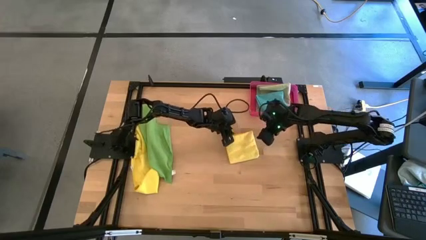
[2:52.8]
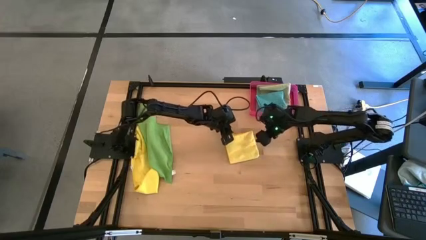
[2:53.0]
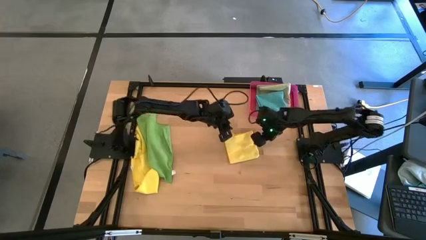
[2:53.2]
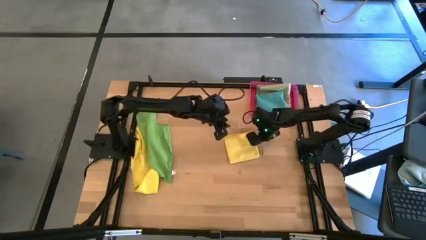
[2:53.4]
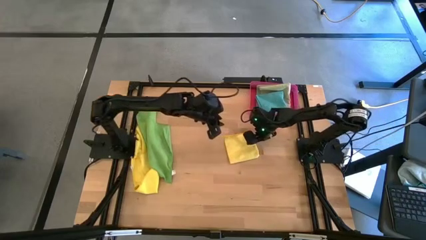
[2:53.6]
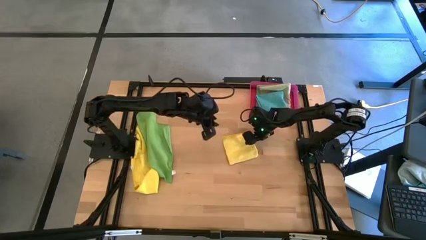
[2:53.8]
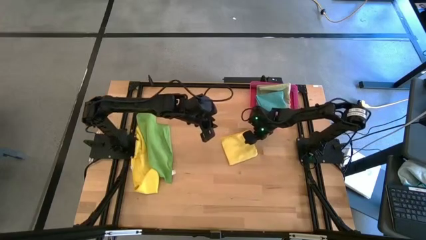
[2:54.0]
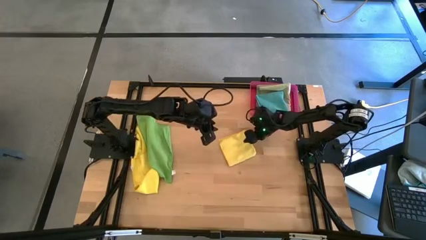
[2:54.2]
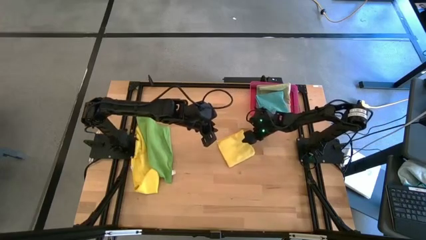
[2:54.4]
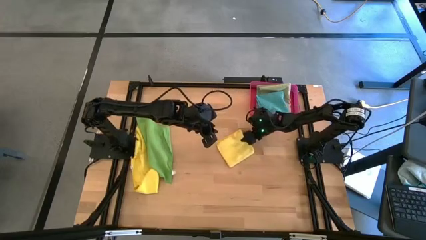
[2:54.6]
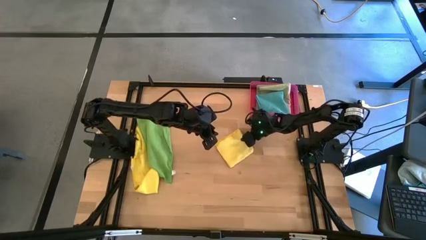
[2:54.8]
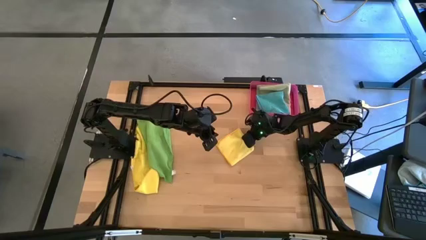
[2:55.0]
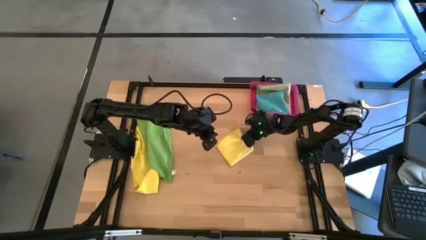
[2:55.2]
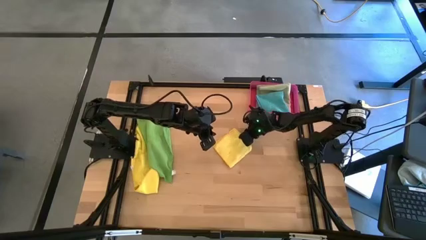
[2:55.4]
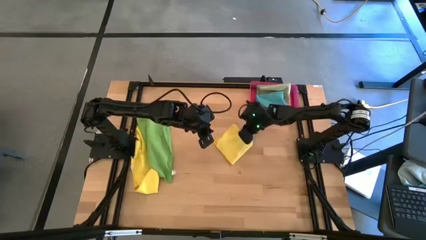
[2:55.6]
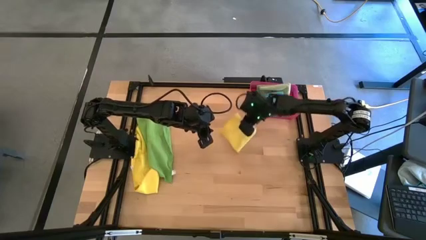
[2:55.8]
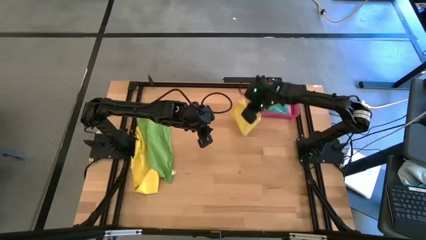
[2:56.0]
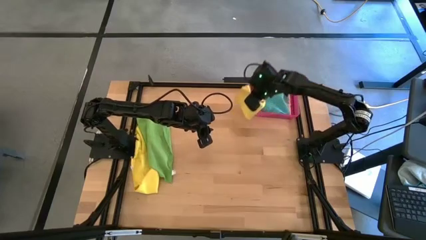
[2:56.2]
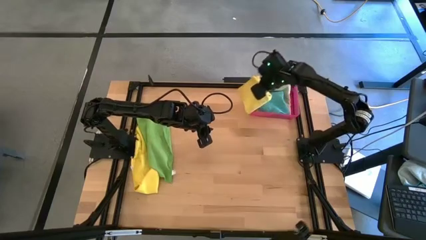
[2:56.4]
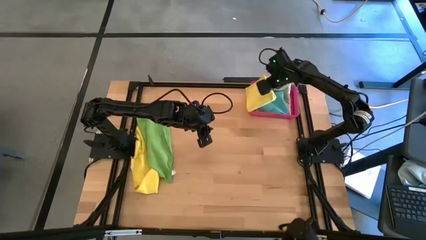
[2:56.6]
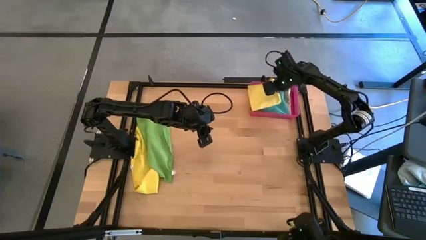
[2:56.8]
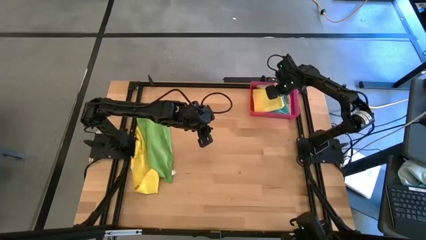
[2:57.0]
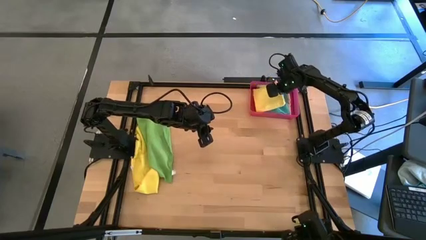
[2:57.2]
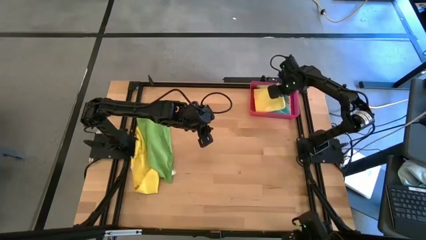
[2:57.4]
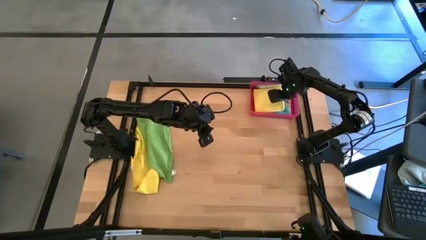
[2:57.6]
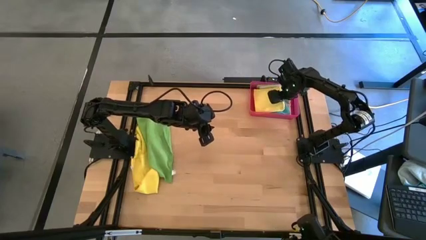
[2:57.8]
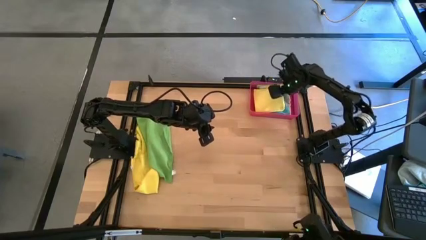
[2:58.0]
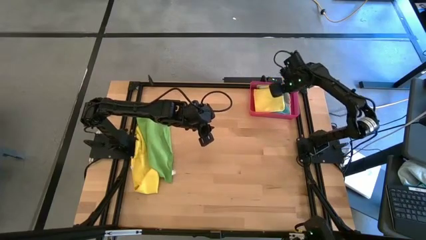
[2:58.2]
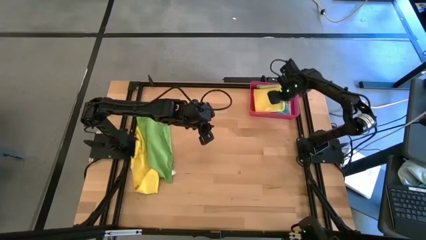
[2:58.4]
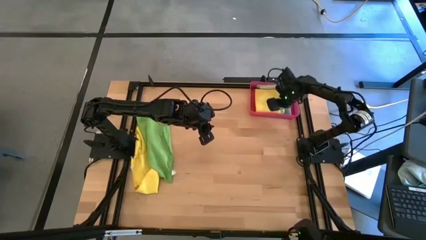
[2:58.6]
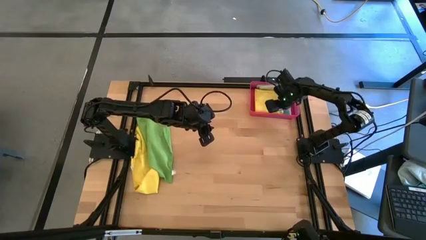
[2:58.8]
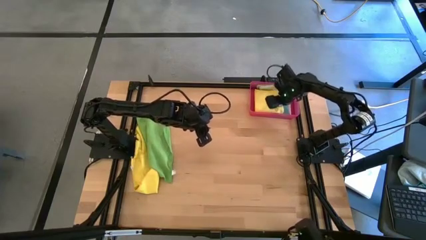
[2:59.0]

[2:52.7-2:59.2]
Task: Fold microfiber towels
Put the right yellow towel into the red bin

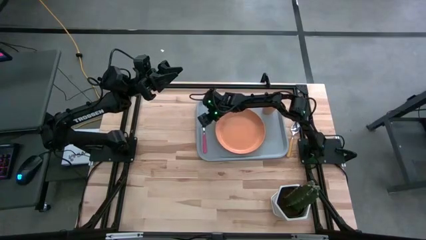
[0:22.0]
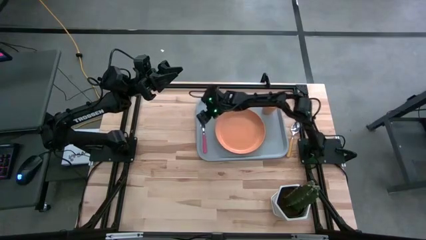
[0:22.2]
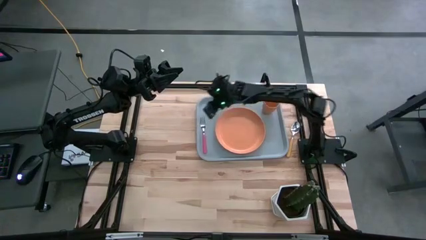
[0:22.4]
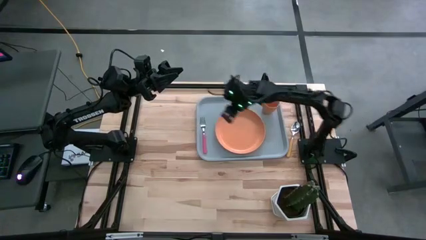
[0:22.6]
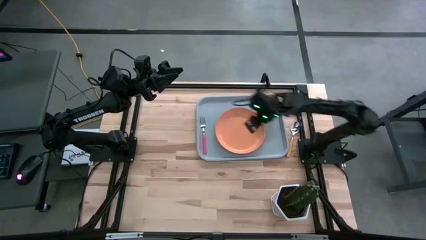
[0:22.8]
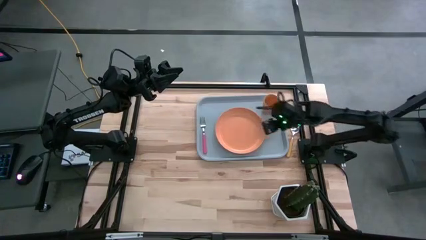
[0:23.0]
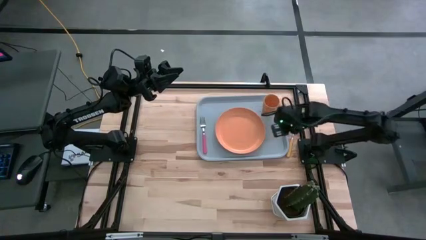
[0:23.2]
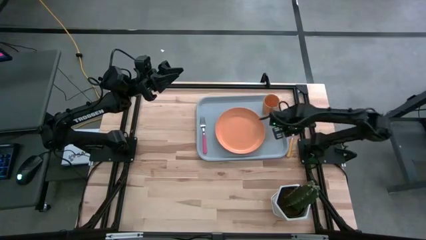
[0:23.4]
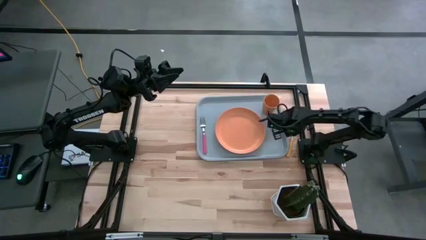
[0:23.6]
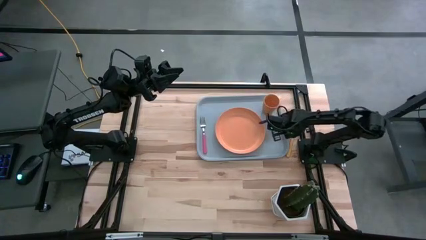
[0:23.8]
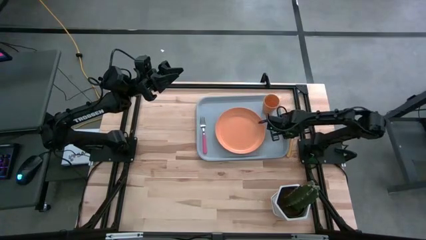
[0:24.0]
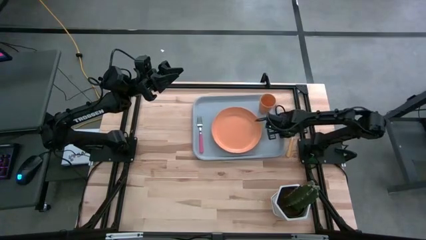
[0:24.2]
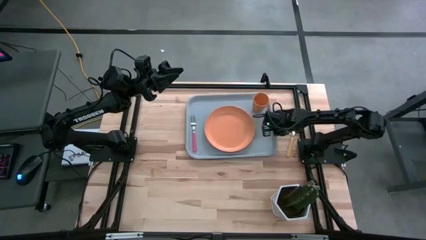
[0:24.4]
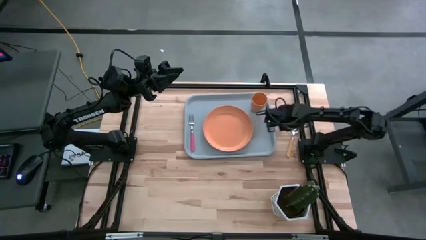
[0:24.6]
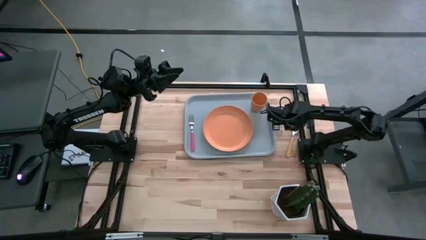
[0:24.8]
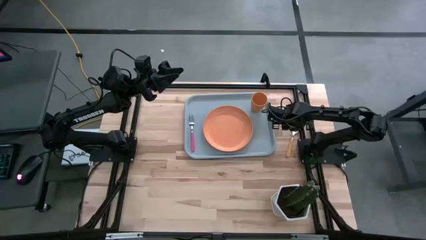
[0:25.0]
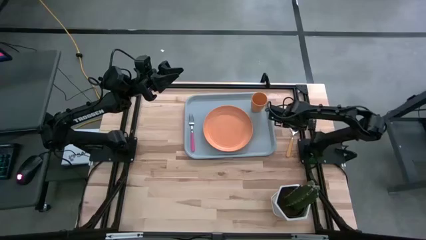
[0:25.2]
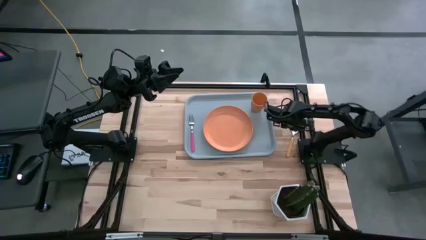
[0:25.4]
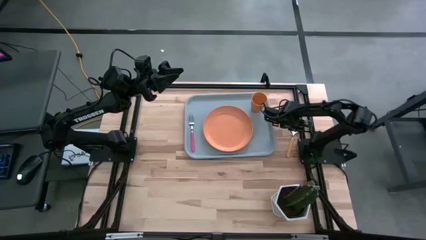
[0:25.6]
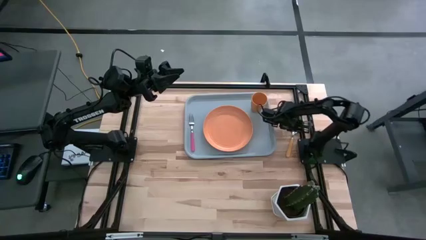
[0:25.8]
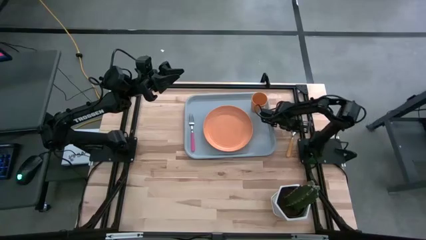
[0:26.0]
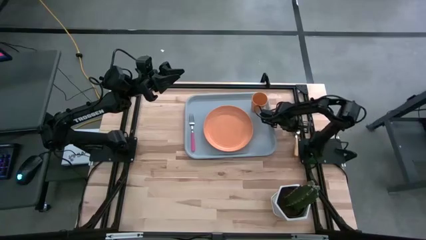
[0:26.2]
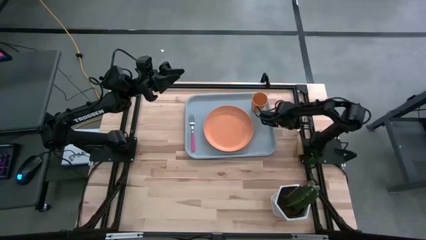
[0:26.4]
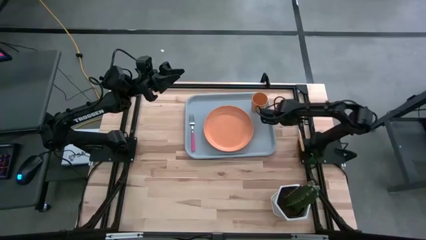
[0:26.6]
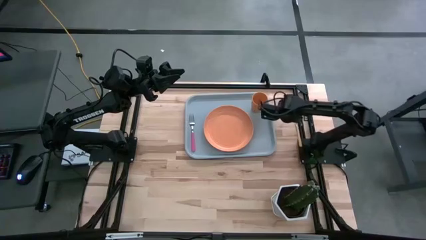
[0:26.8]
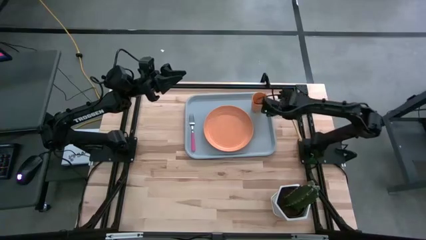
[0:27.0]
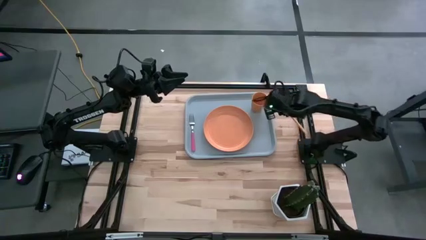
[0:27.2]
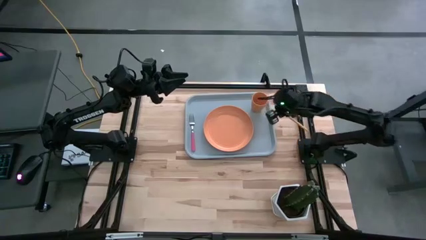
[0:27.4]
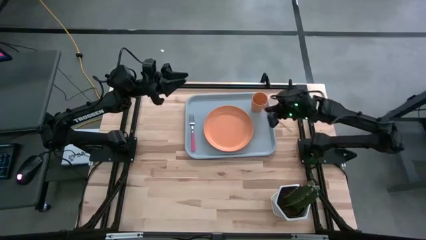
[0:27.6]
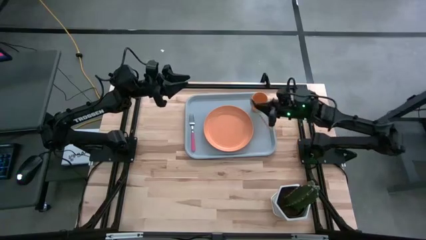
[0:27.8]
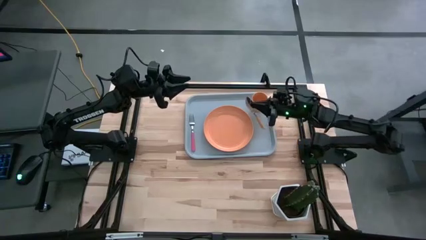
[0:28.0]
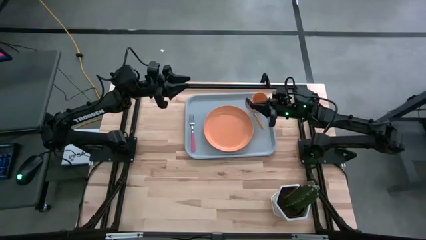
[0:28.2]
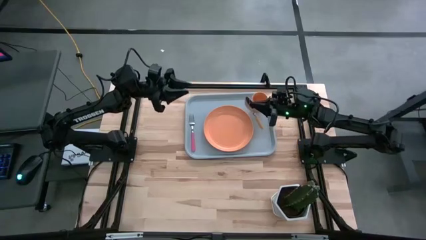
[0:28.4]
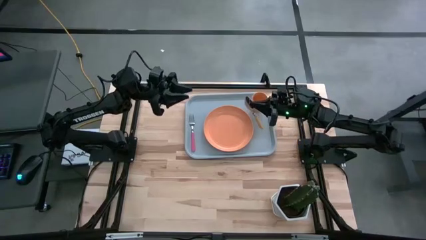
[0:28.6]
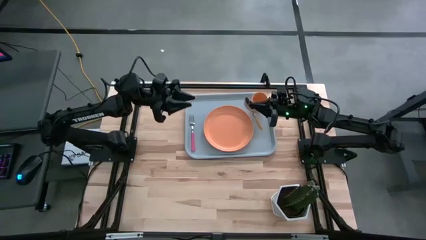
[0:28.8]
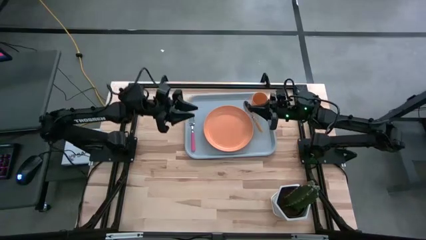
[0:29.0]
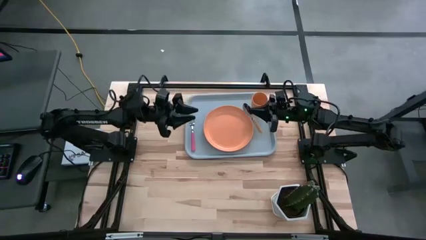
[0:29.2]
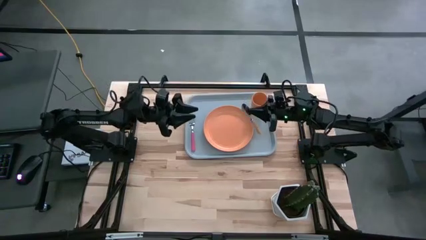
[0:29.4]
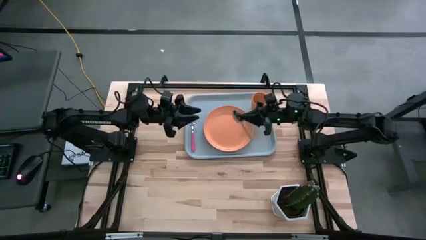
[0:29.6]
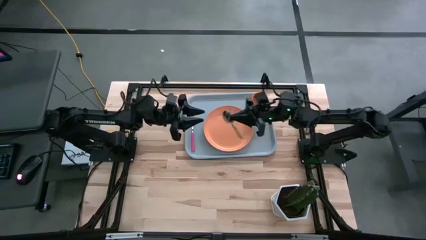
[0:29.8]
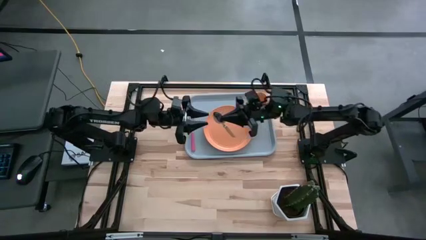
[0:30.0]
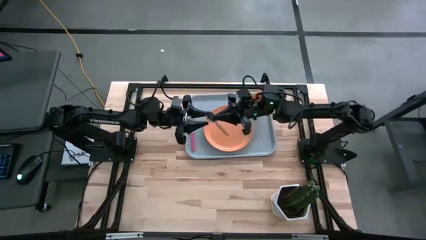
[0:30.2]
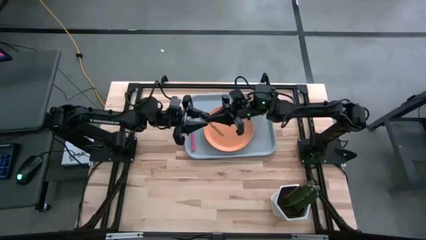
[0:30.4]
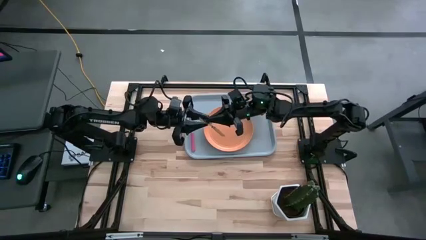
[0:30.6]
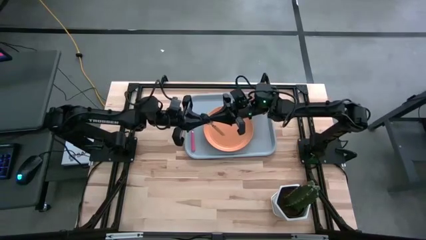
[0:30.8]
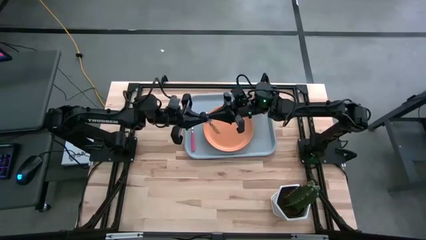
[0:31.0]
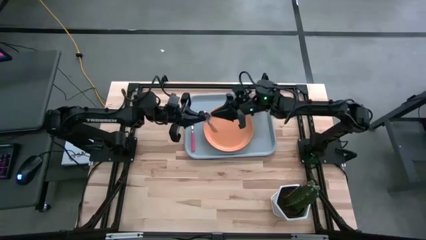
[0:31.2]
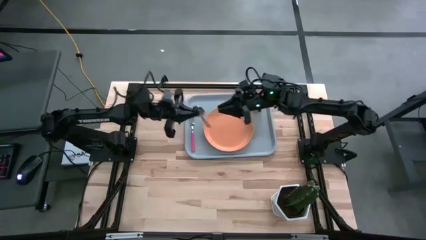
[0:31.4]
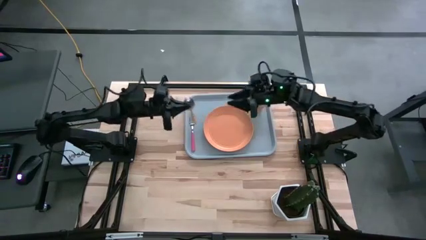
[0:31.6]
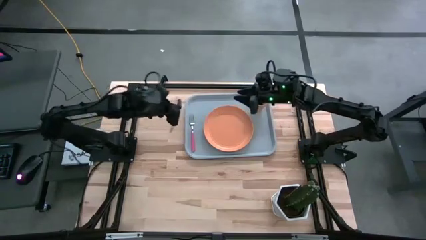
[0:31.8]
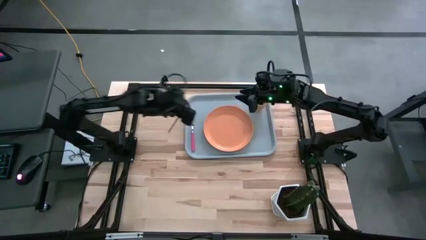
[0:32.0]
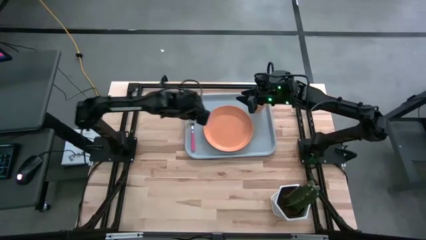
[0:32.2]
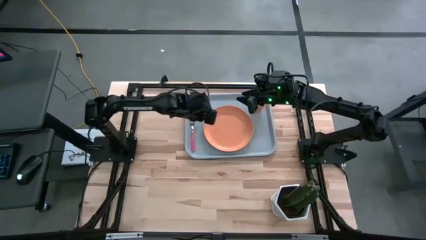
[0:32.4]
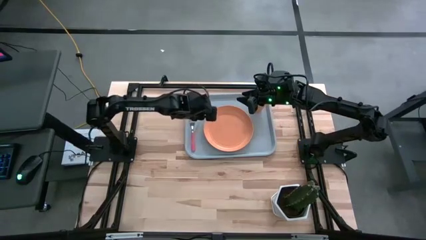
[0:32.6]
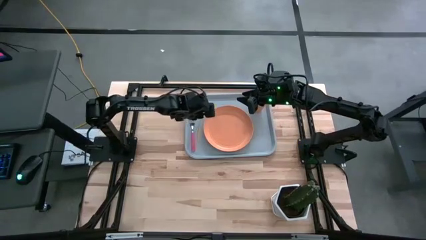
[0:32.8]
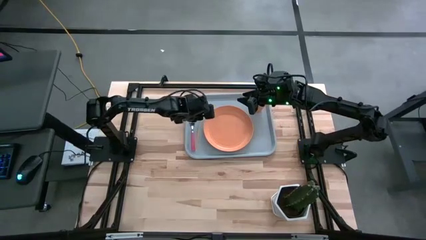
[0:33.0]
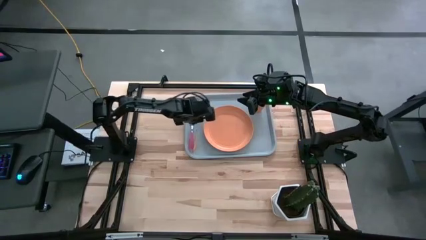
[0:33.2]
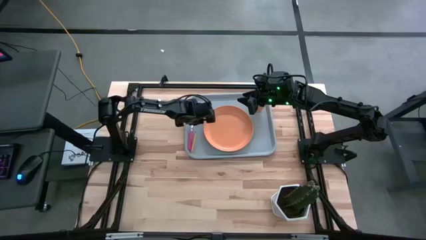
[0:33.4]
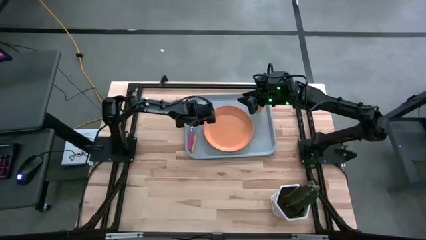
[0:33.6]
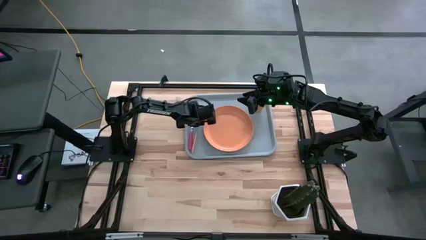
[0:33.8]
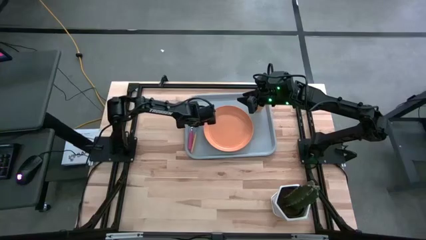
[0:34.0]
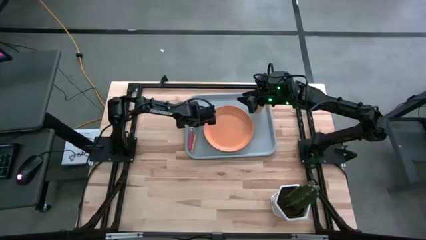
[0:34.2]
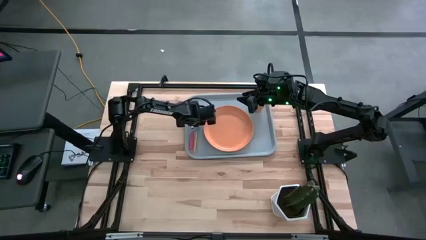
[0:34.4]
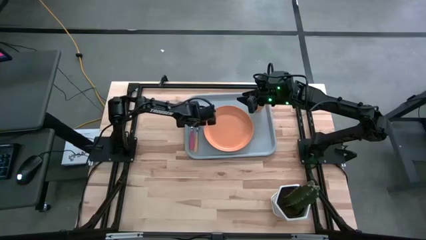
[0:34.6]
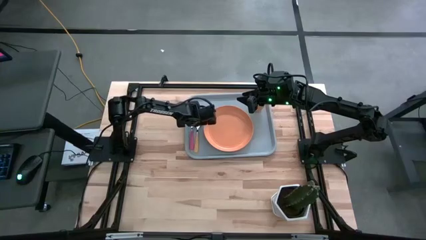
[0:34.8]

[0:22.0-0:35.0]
Task: Pick and place plate/cup/fork/spoon on tray
Put the orange spoon on the gray serving tray to the right of the pink spoon
